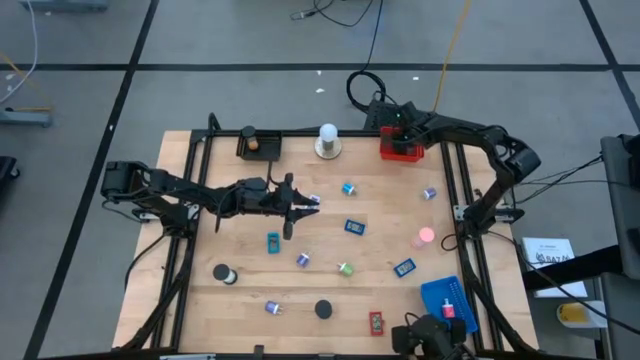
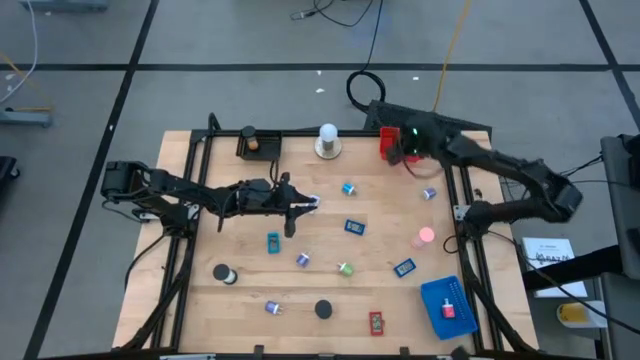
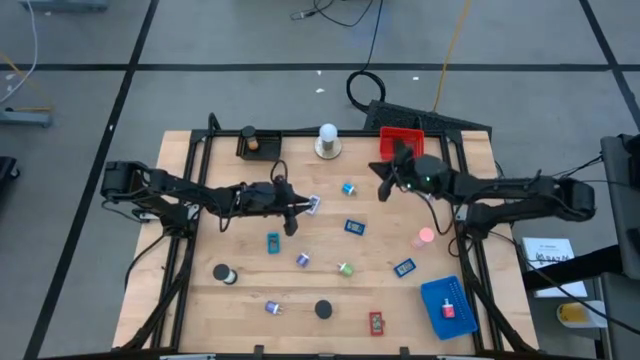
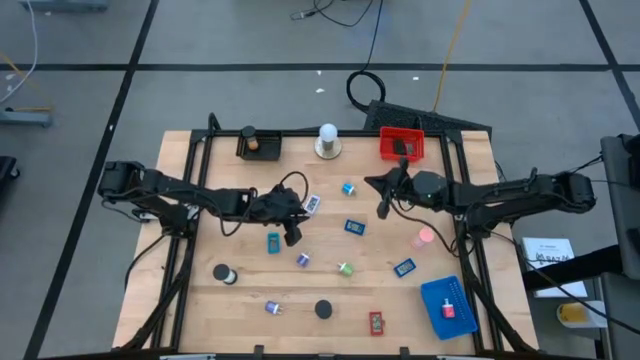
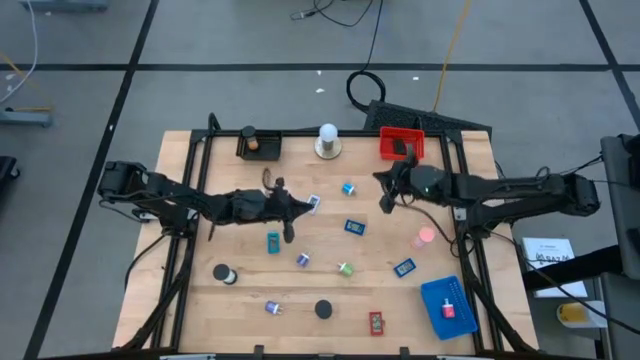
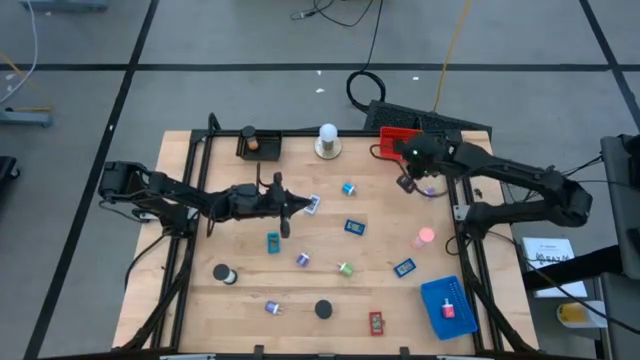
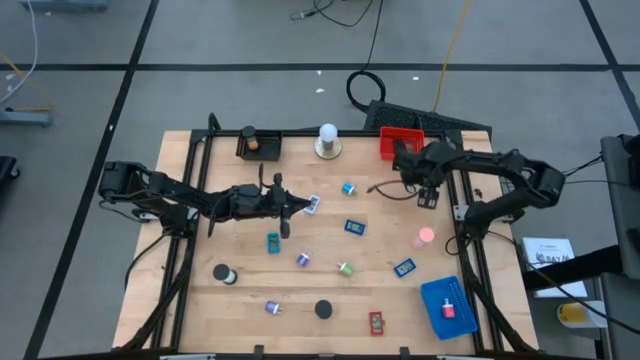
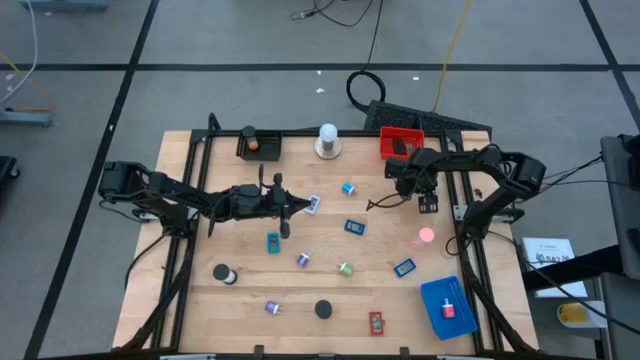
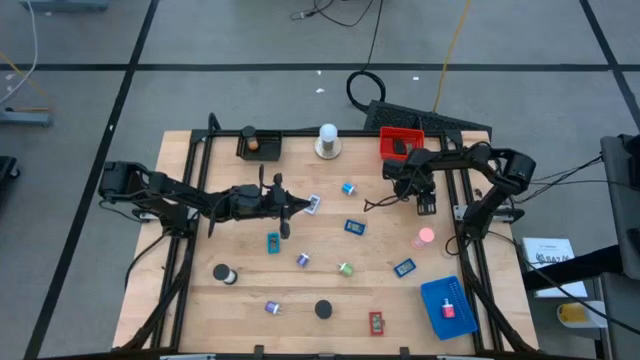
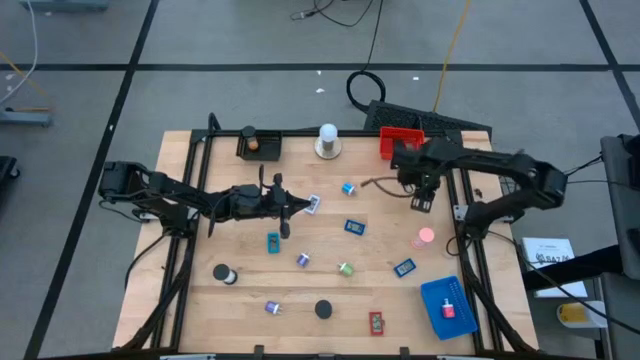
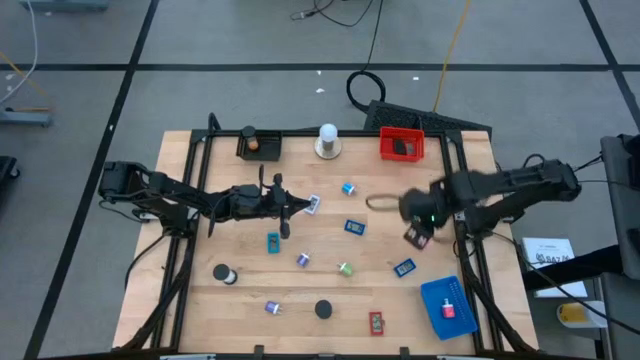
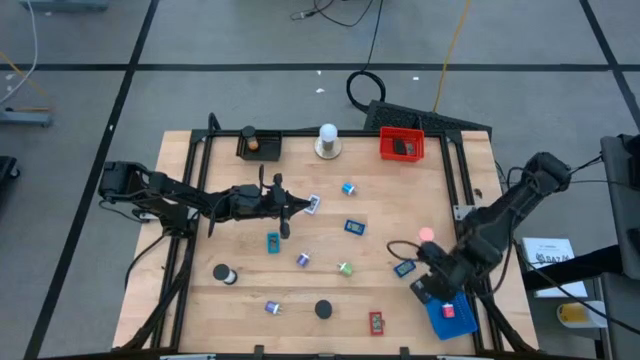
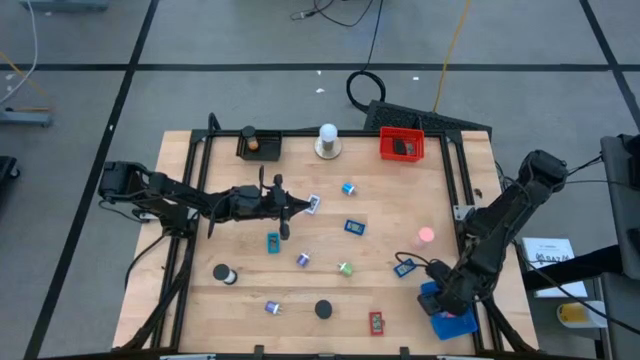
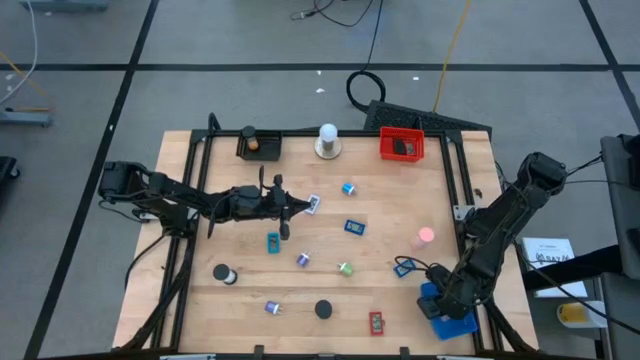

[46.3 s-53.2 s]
Task: Pick & Place Office items
Put the violet charger adapter into the red bin

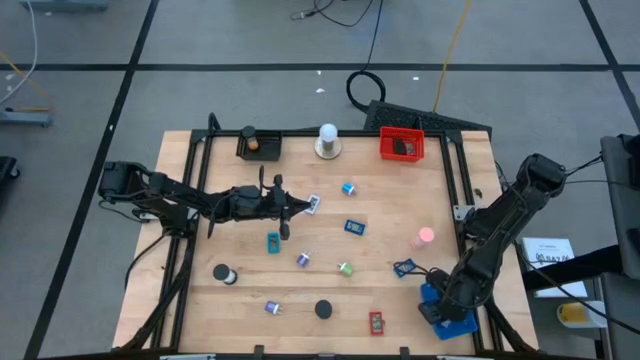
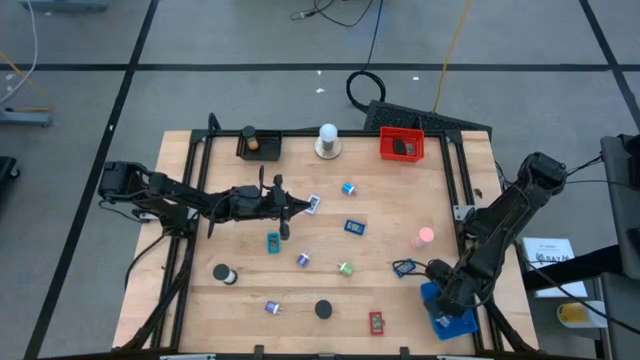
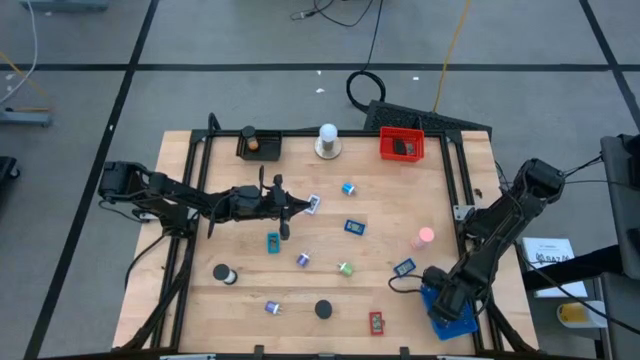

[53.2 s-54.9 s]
Adjust the pink charger adapter on the blue bin

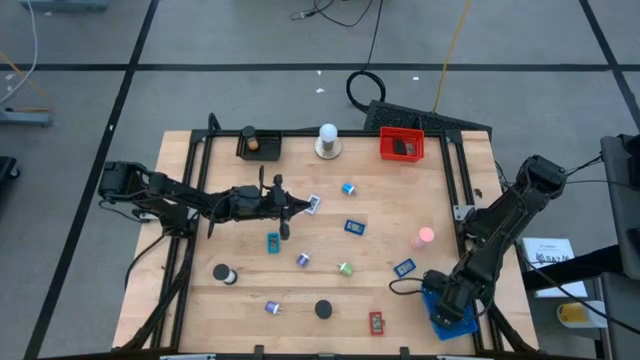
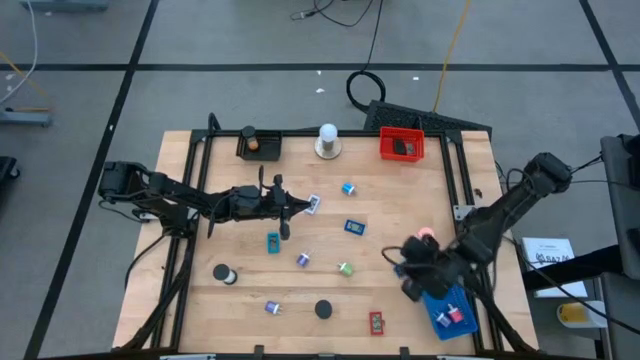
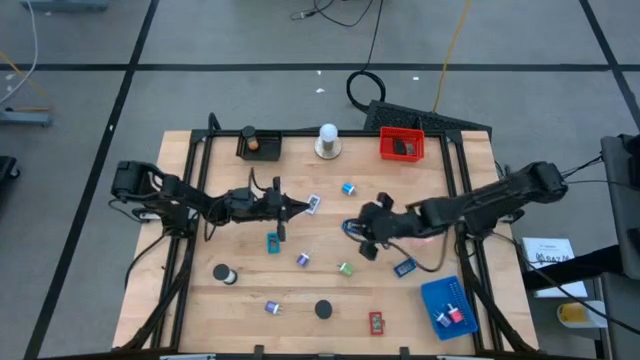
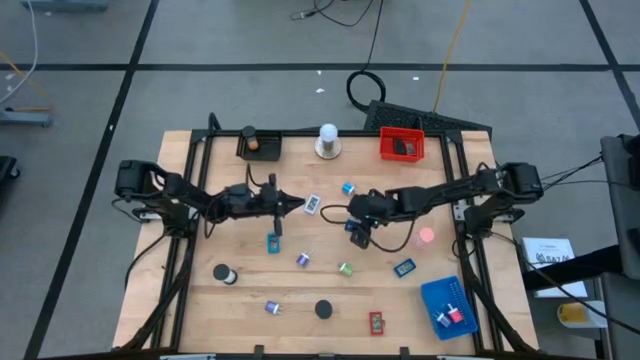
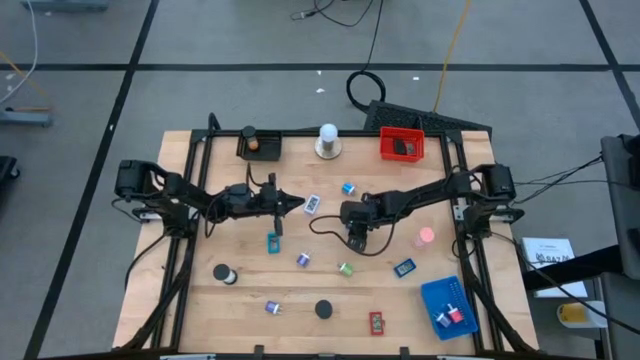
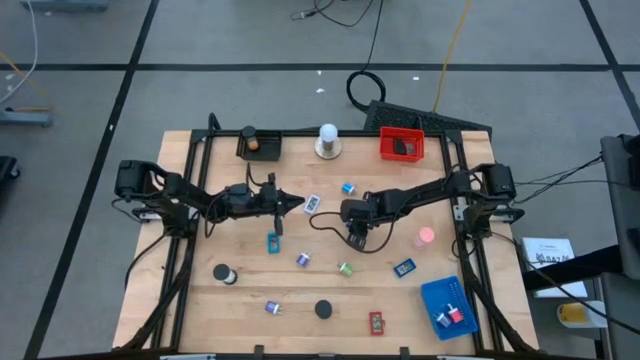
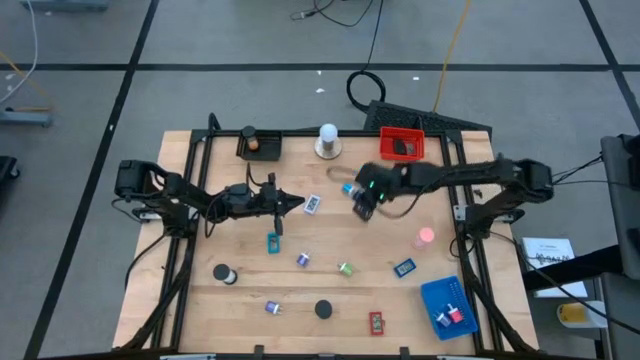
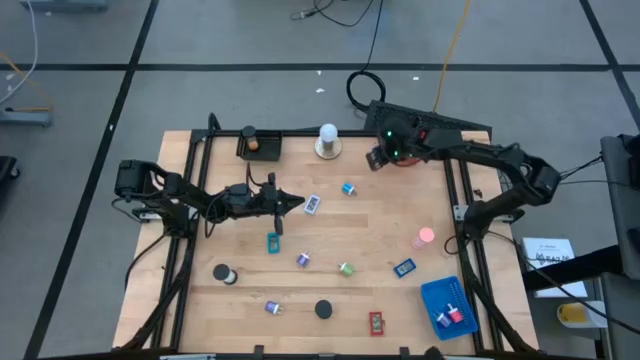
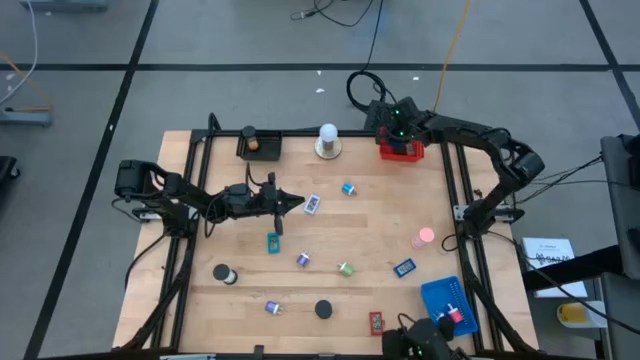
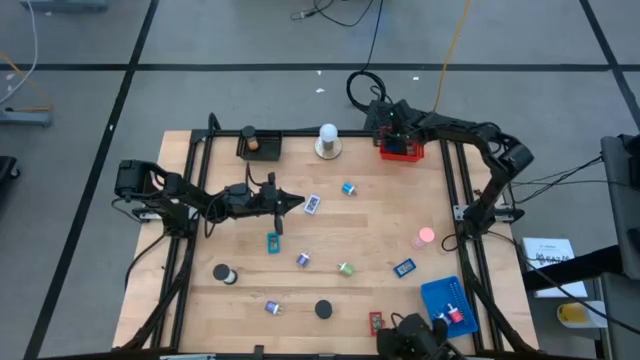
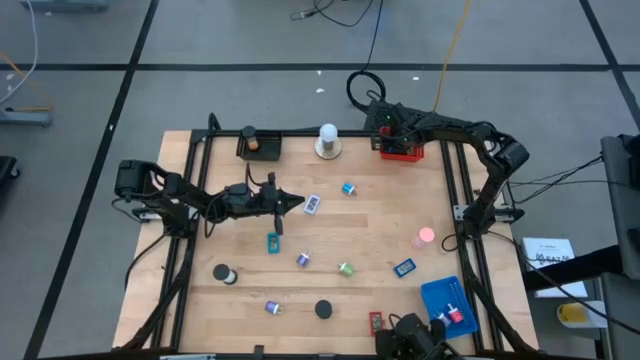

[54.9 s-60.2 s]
Put the blue digital timer into the red bin

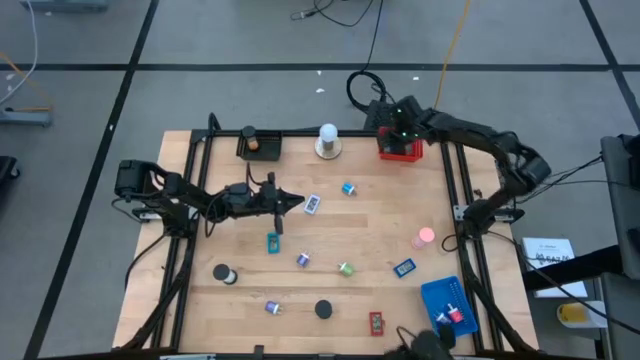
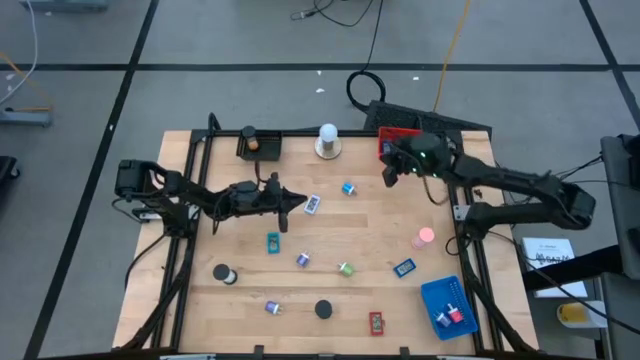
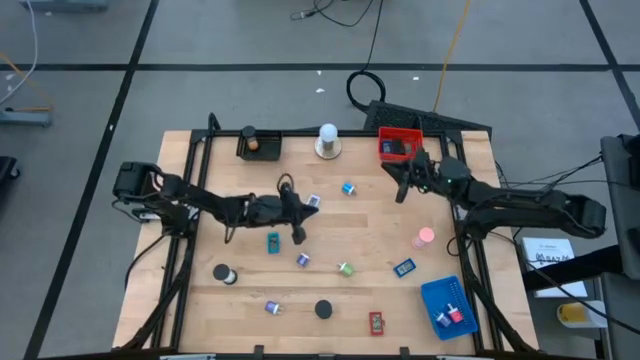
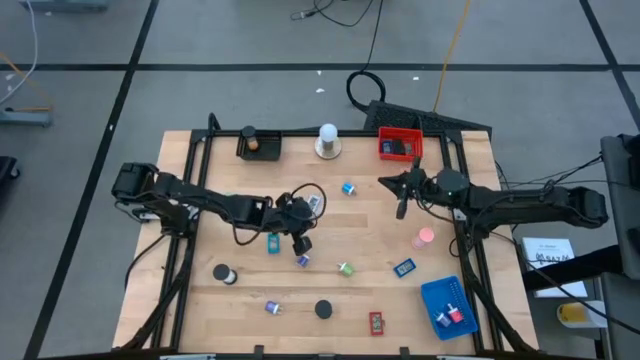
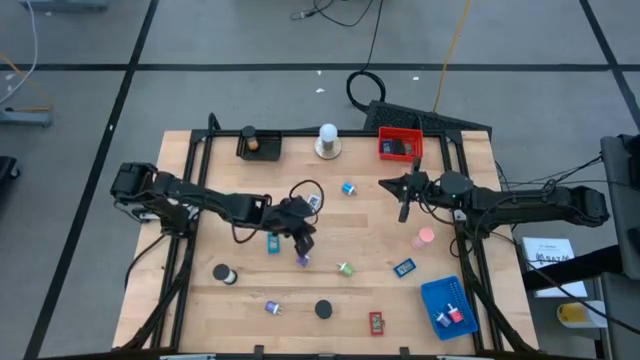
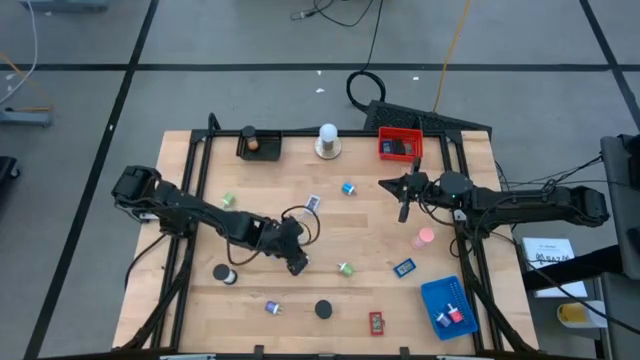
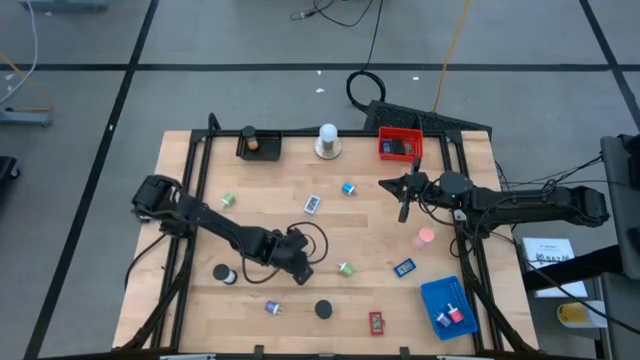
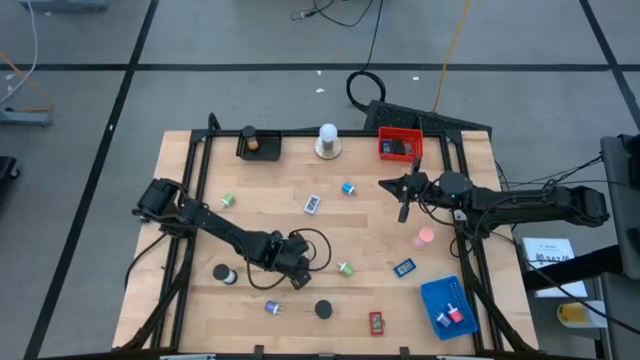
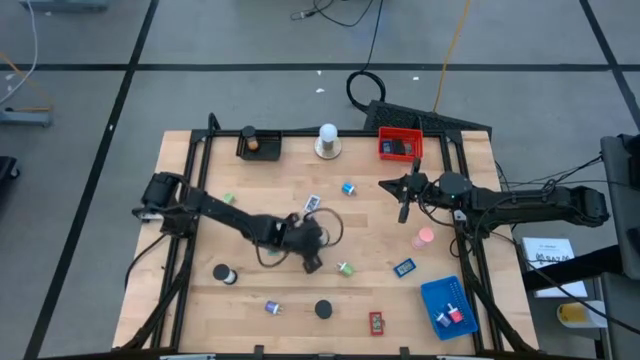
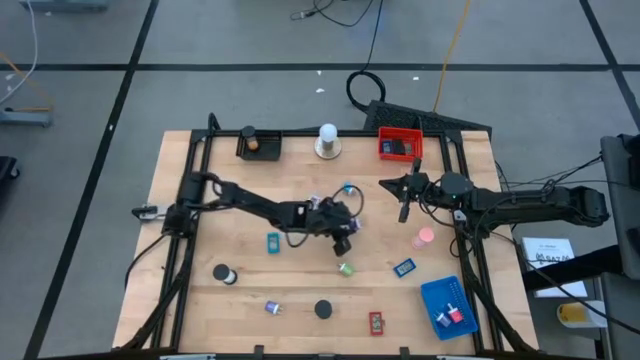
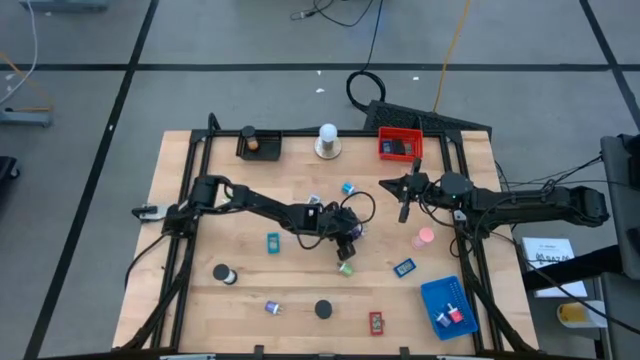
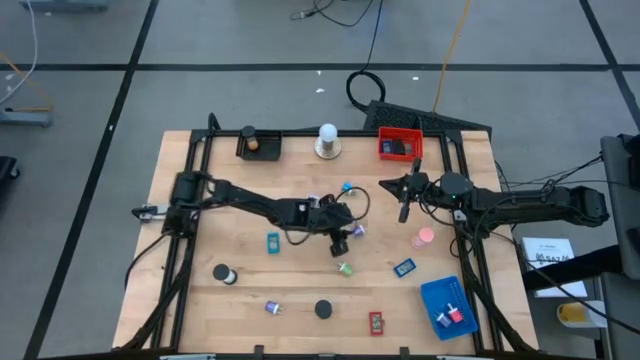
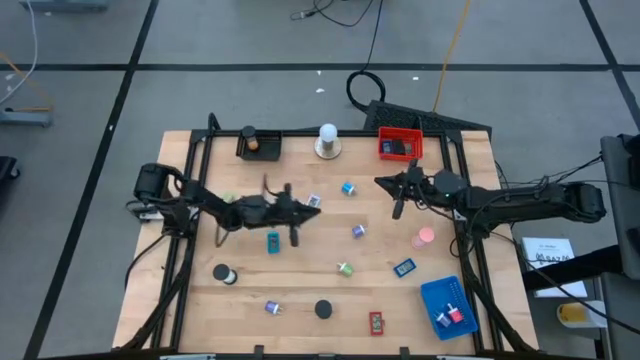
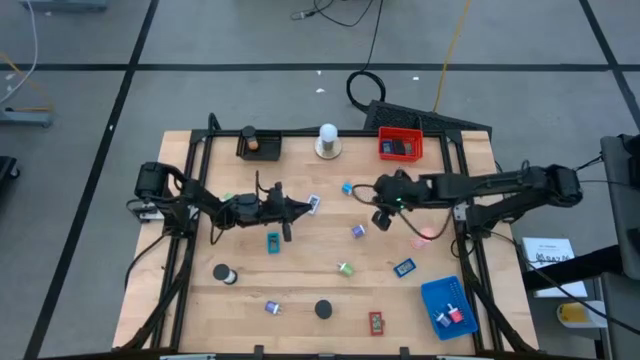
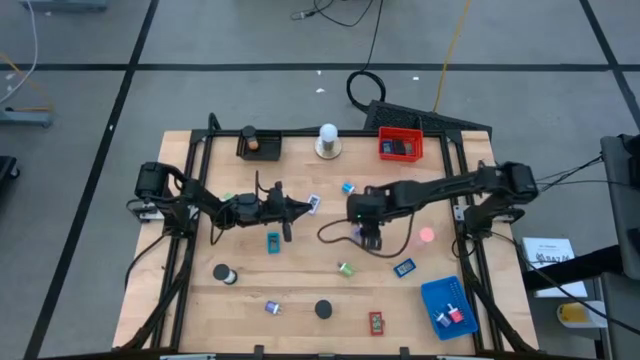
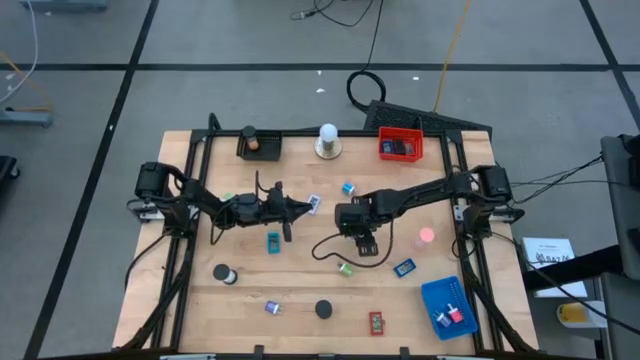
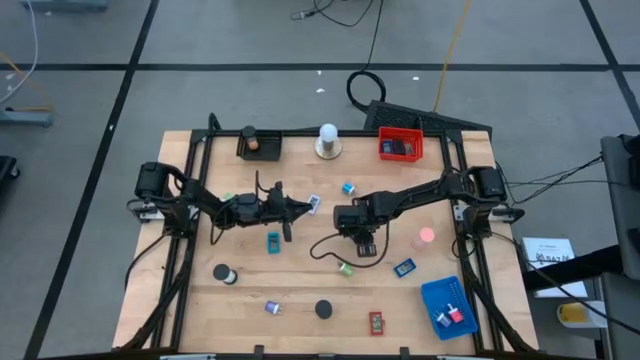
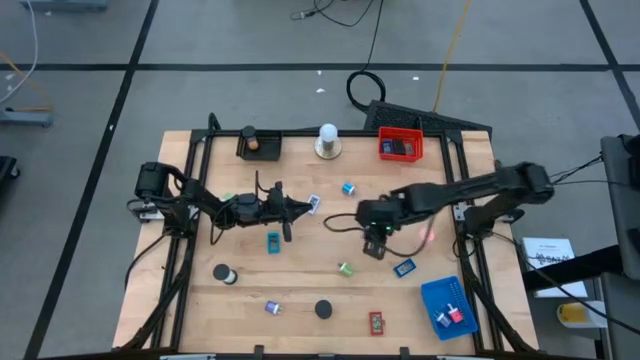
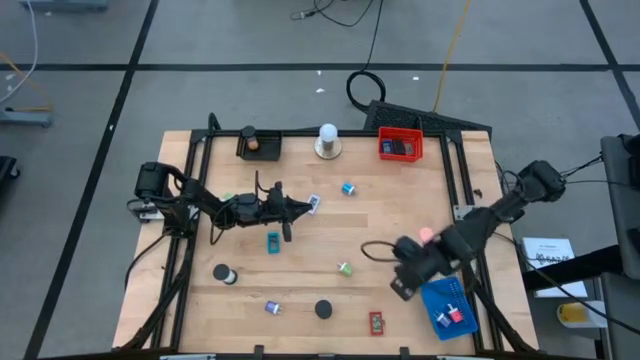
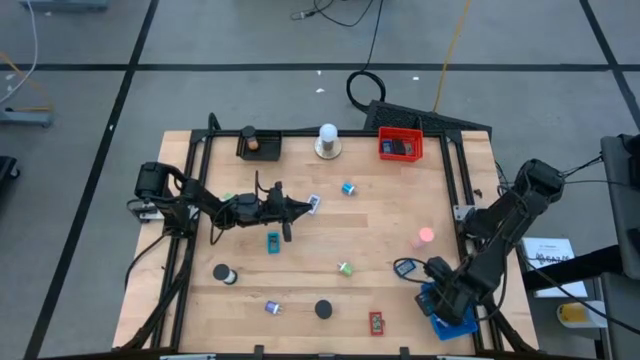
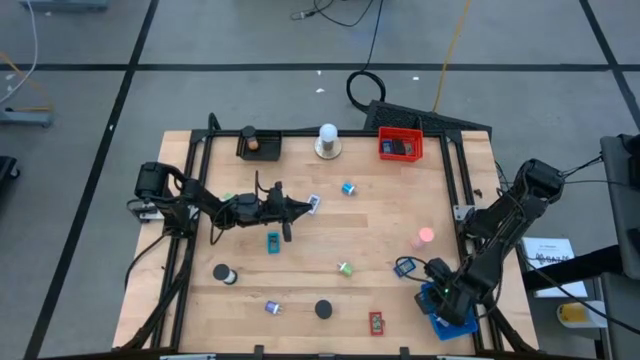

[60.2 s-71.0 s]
Put the violet charger adapter into the blue bin
